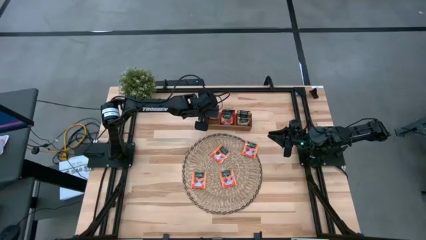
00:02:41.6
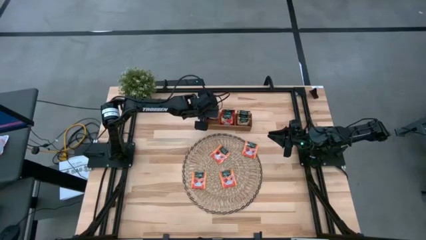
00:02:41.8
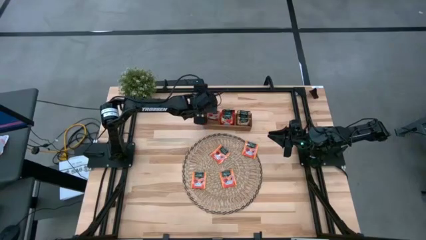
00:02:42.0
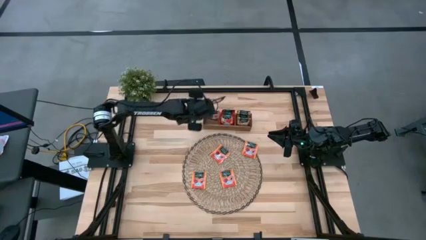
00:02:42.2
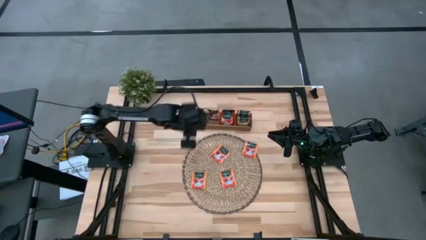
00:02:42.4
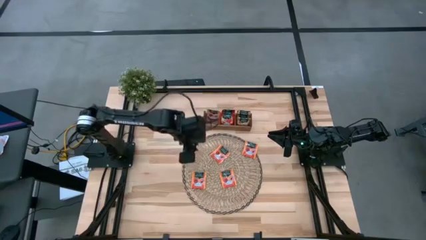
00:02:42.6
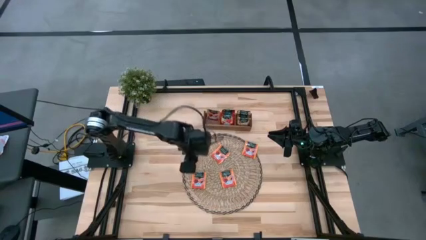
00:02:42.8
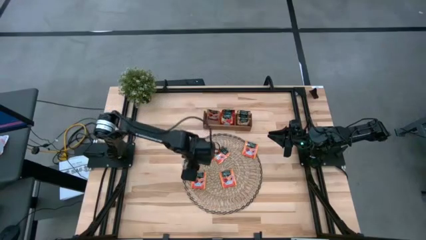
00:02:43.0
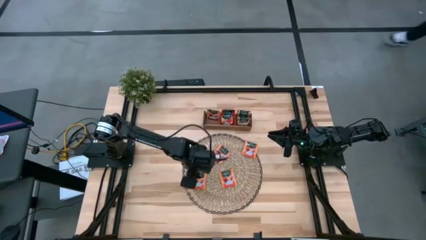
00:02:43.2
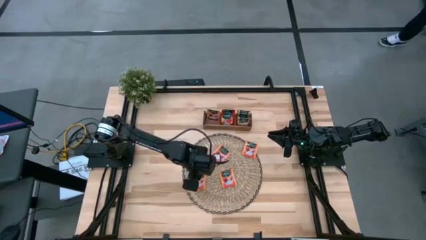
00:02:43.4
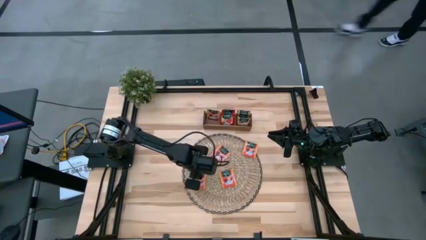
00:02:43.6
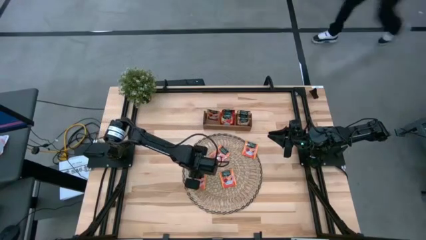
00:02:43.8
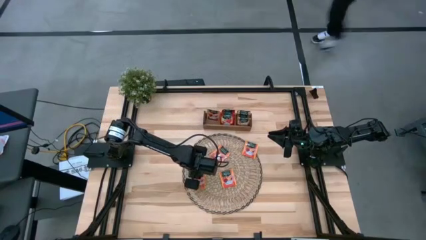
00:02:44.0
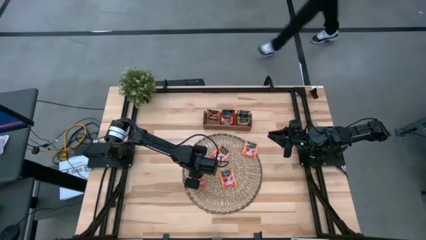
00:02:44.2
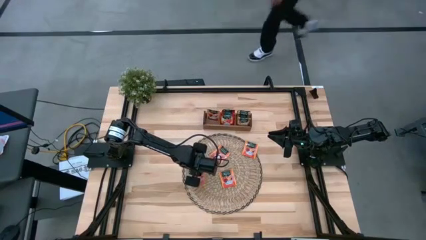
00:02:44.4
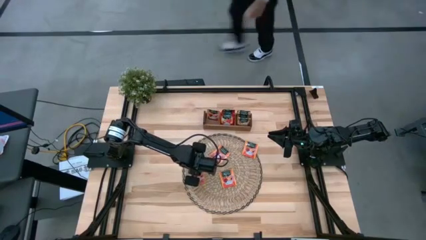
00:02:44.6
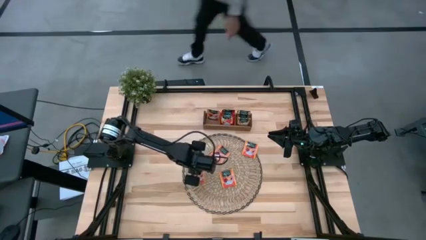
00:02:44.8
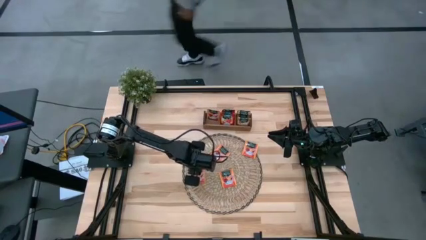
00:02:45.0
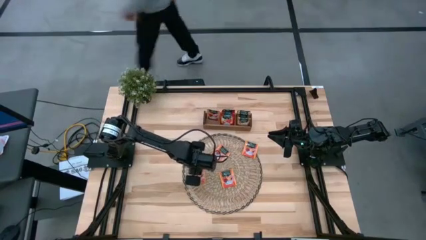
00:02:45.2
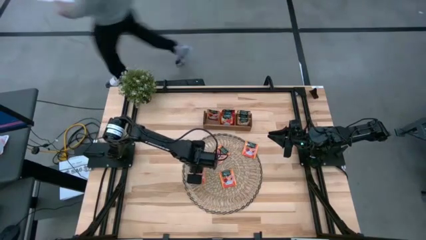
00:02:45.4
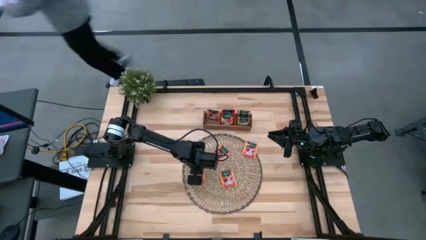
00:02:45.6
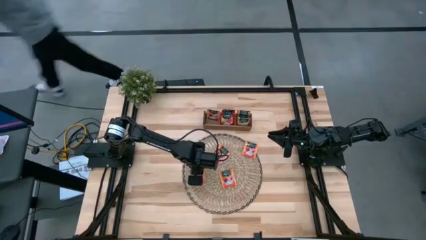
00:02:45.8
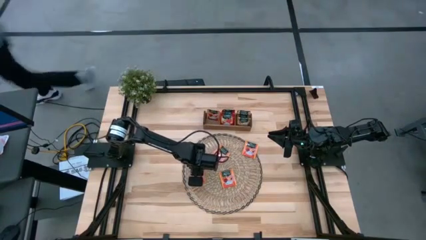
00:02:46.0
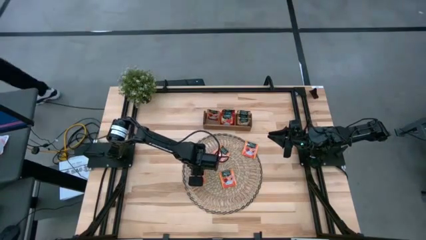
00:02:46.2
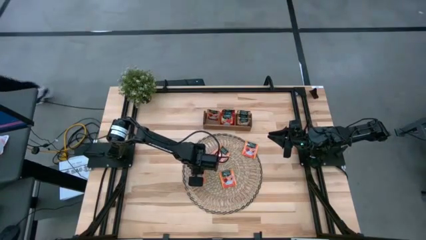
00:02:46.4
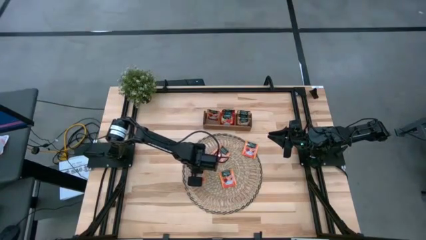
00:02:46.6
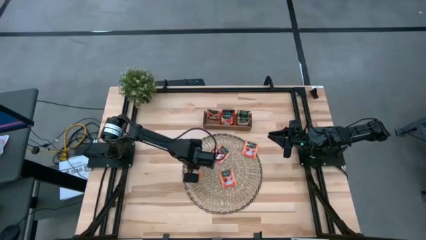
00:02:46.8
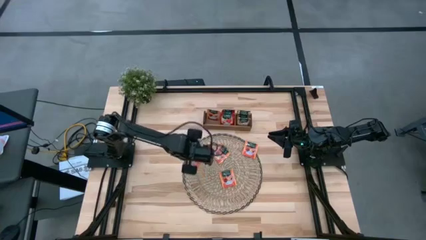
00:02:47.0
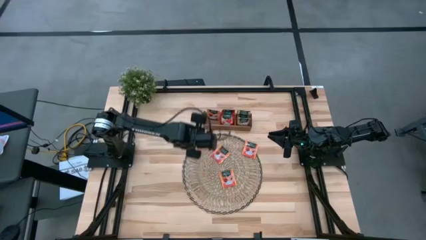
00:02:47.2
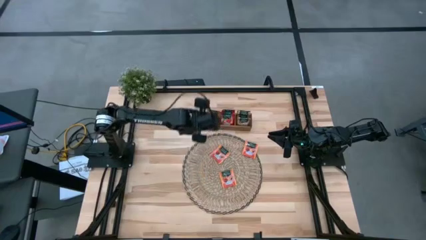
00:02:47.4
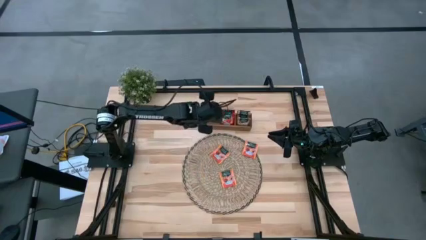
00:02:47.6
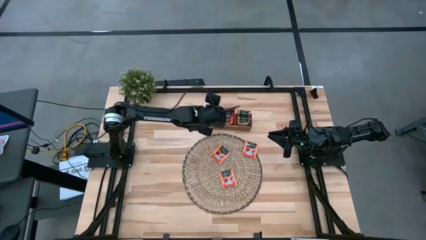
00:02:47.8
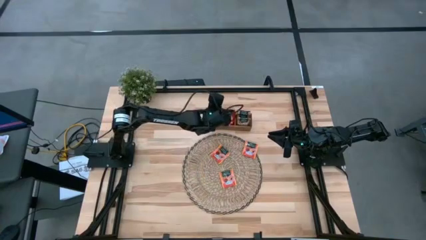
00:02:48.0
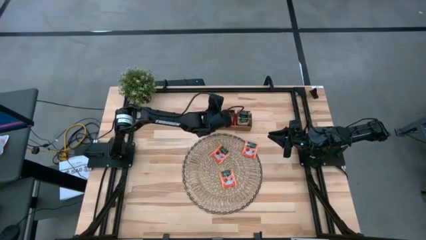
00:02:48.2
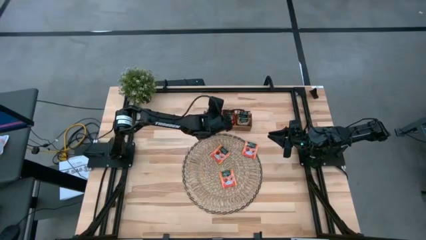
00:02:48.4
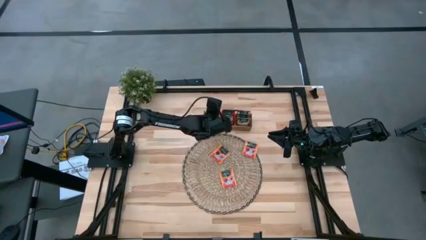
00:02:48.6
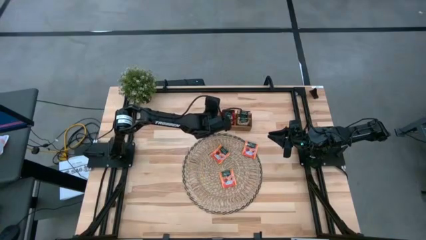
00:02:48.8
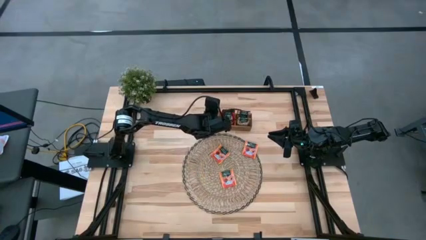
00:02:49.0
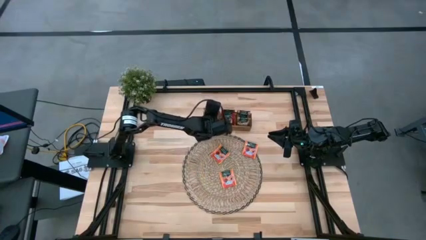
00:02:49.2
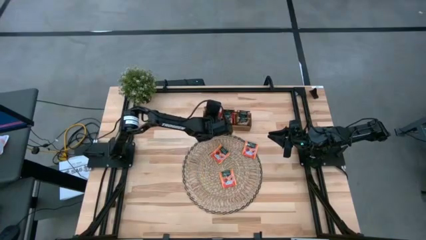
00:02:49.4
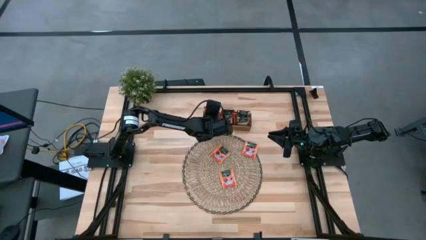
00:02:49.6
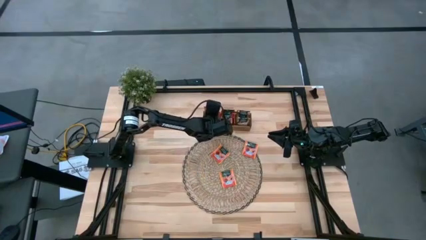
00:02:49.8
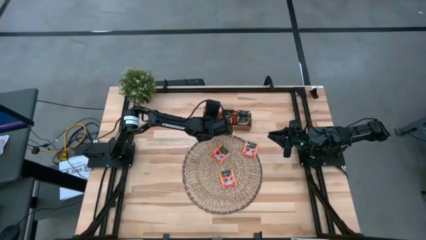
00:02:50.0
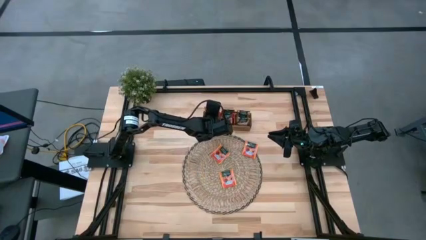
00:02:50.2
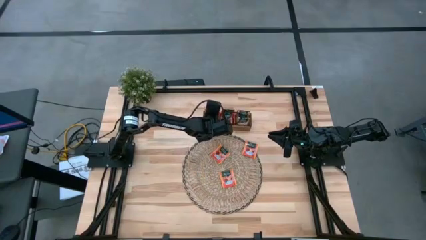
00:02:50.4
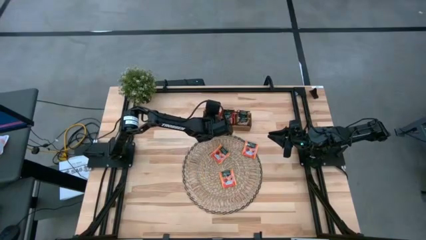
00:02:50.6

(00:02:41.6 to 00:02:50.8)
Task: Pick & Place Tea
Put the orange tea bag into the left section of the wooden organizer

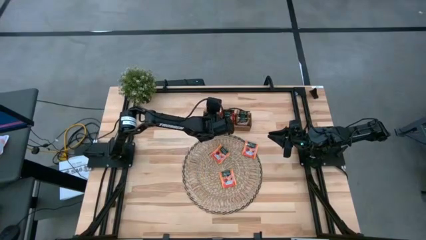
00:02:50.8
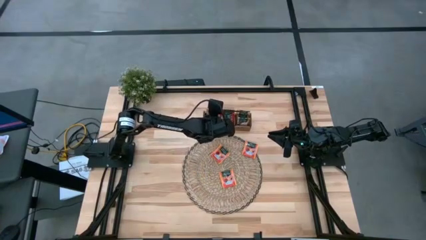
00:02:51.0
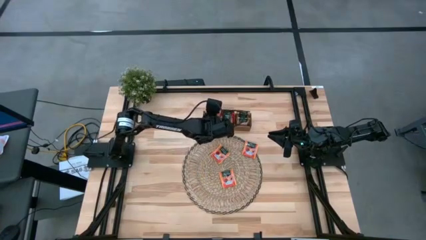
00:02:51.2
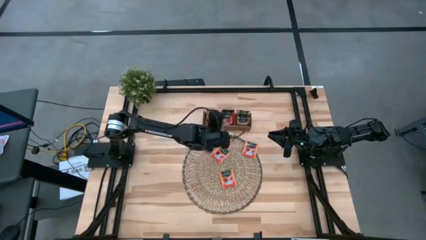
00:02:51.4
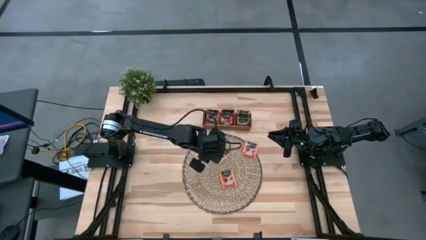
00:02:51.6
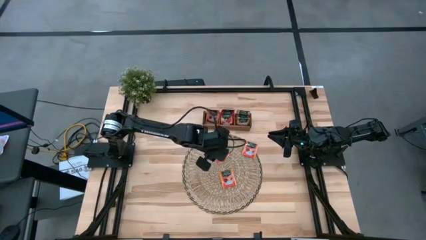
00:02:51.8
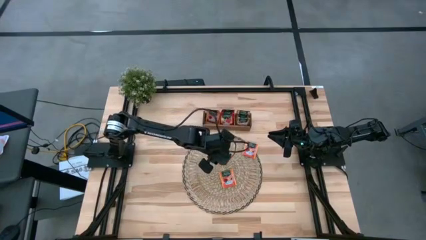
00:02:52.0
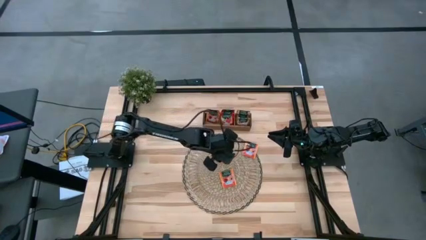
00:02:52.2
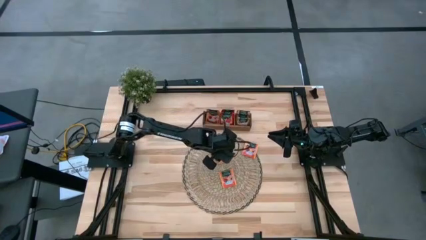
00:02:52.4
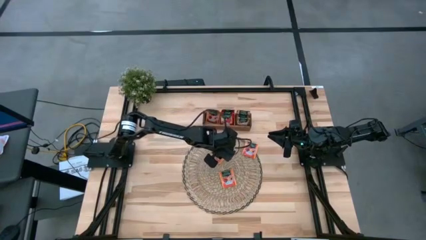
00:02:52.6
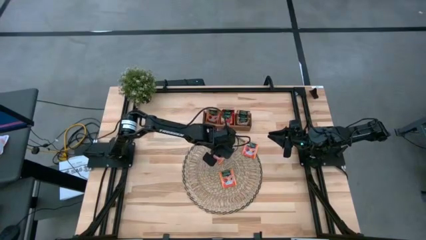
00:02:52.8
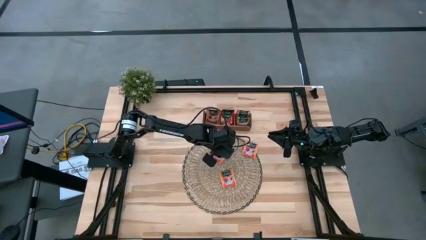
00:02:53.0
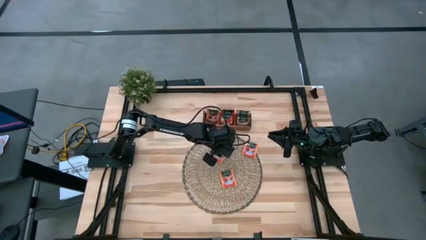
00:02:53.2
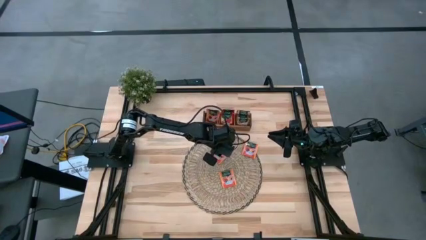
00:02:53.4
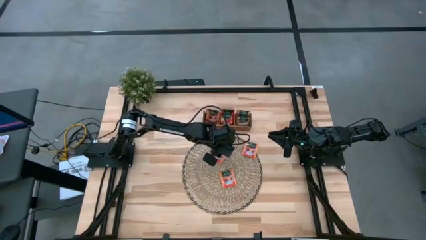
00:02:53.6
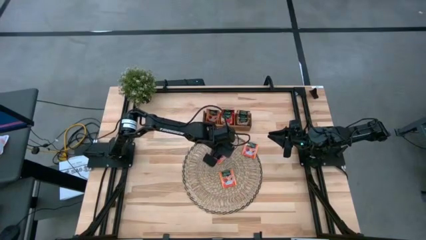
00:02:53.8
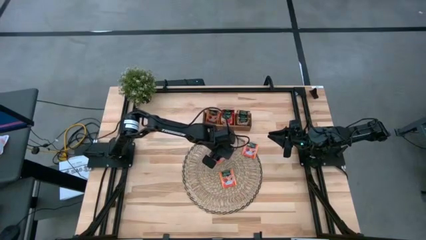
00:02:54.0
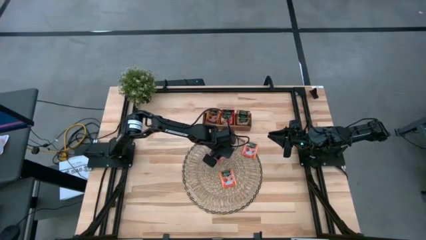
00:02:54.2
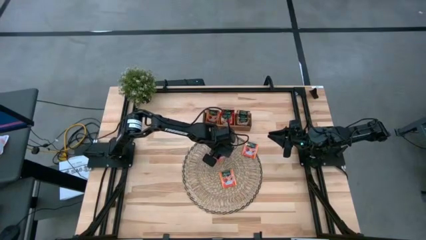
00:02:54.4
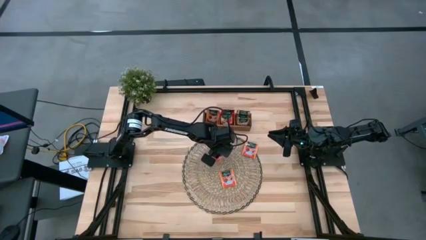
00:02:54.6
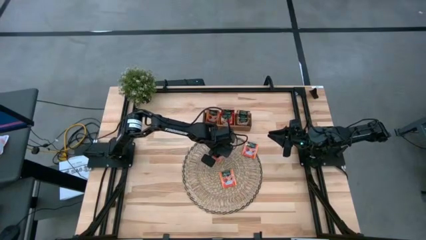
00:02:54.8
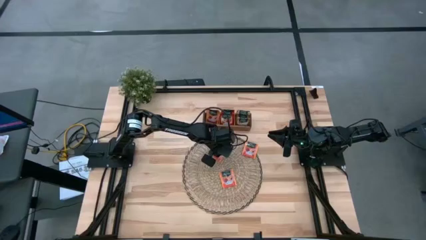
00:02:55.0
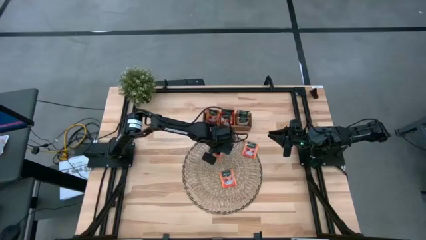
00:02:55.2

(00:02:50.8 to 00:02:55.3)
Put the orange tea bag into the left section of the wooden organizer
